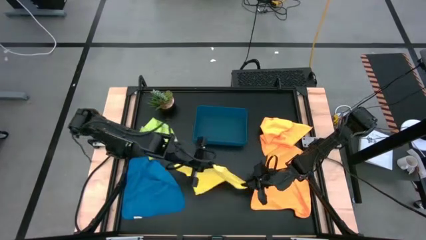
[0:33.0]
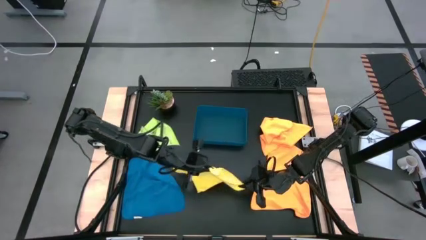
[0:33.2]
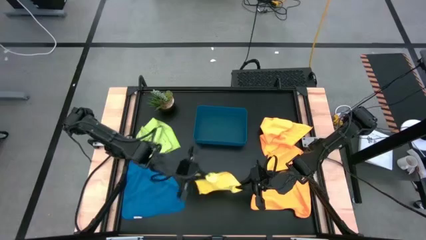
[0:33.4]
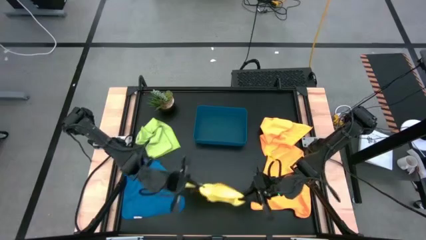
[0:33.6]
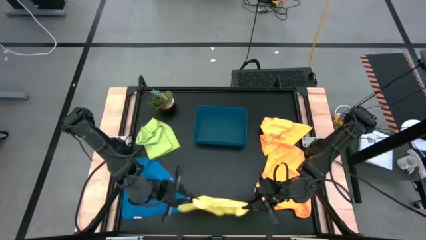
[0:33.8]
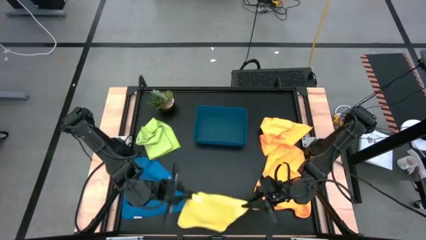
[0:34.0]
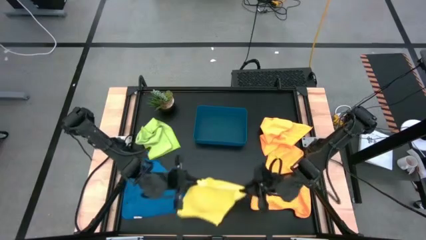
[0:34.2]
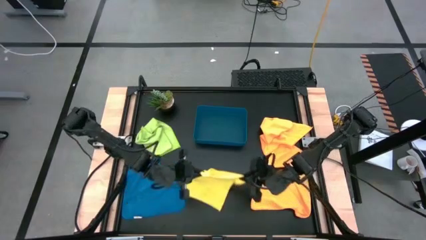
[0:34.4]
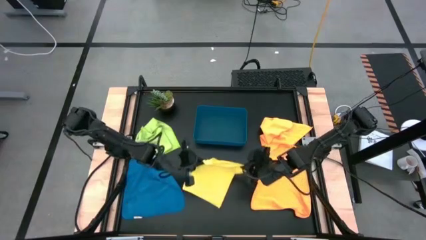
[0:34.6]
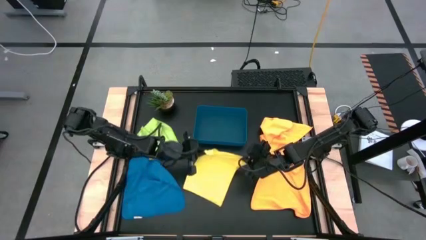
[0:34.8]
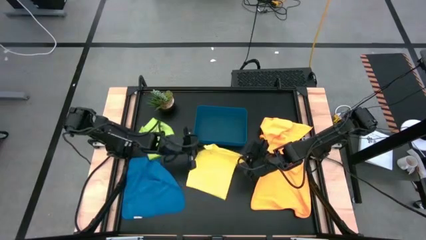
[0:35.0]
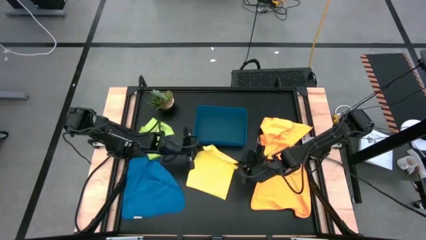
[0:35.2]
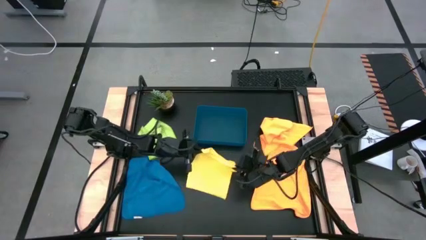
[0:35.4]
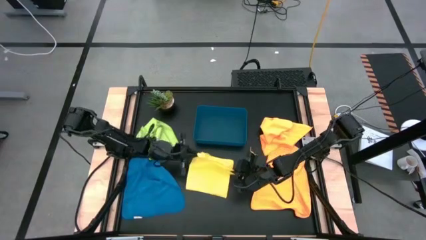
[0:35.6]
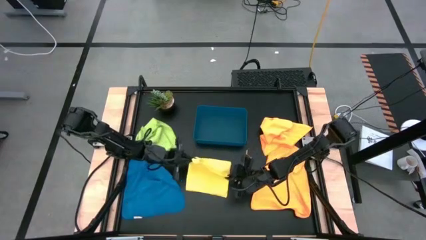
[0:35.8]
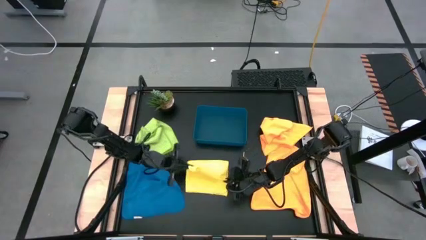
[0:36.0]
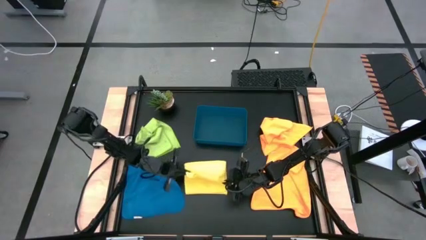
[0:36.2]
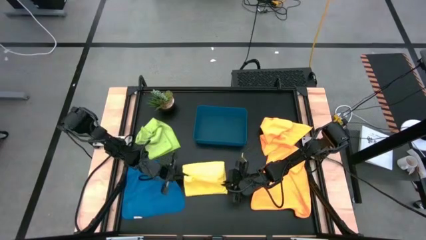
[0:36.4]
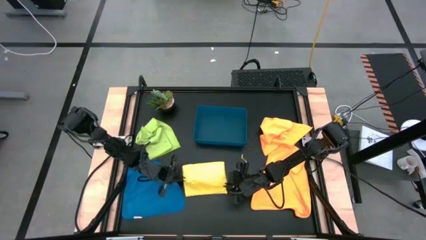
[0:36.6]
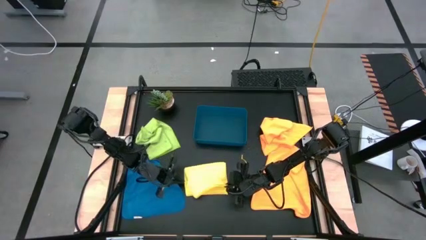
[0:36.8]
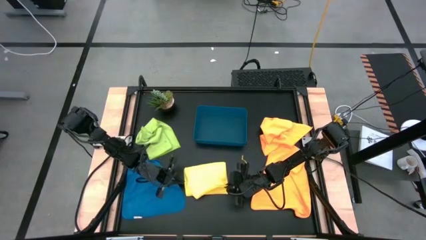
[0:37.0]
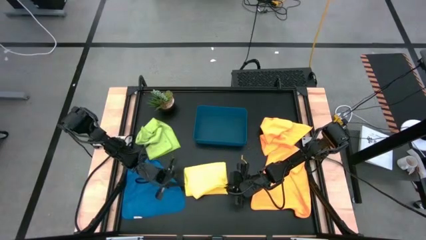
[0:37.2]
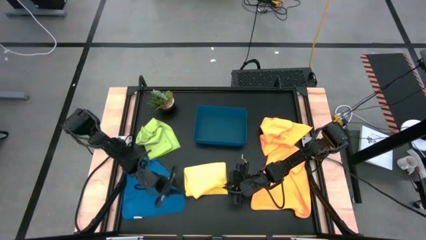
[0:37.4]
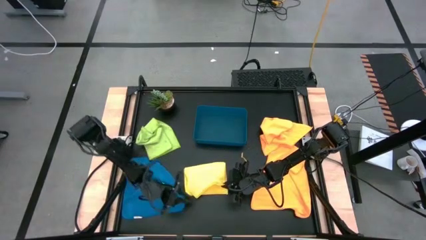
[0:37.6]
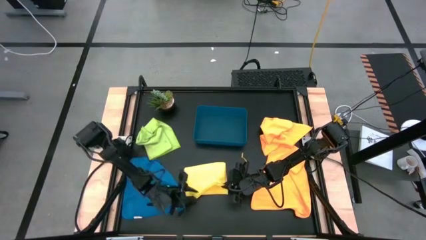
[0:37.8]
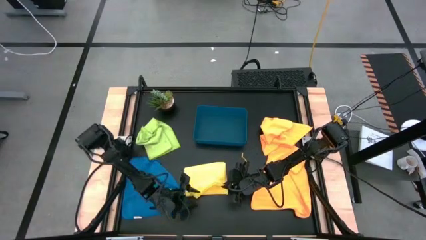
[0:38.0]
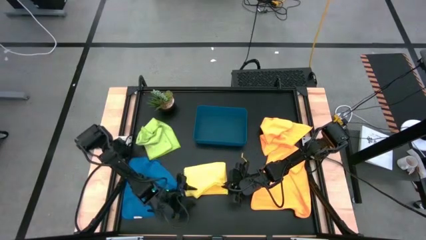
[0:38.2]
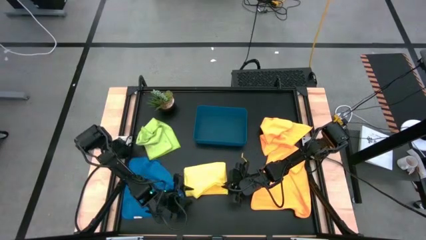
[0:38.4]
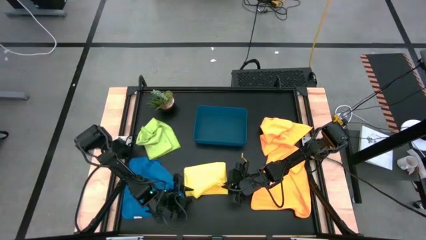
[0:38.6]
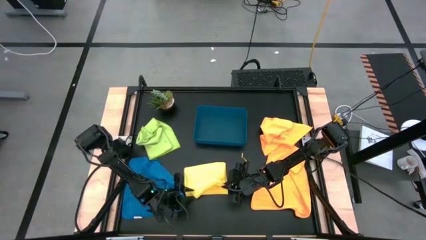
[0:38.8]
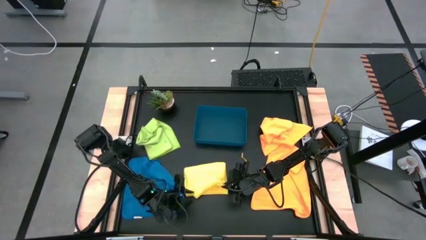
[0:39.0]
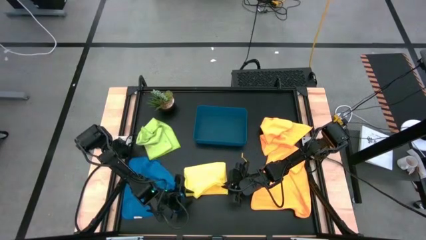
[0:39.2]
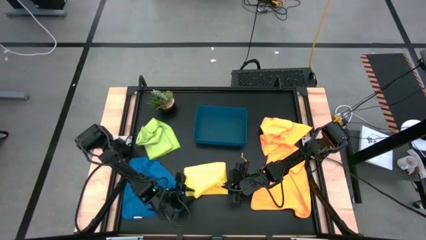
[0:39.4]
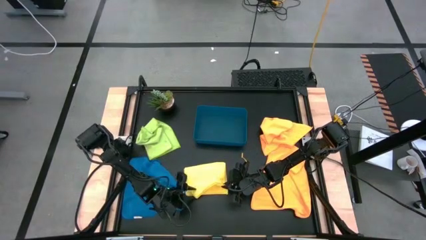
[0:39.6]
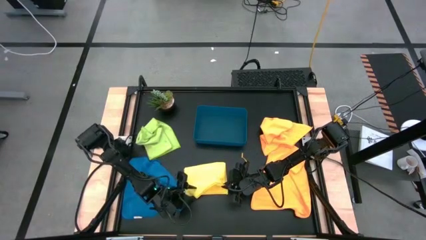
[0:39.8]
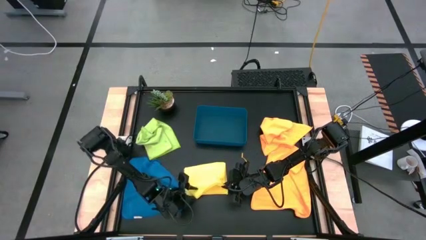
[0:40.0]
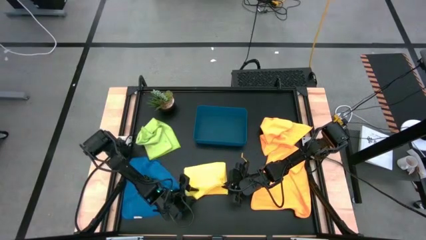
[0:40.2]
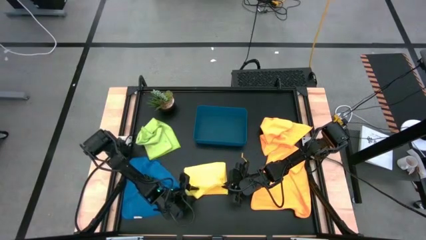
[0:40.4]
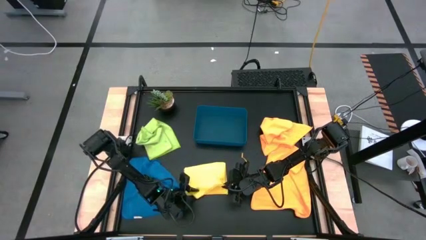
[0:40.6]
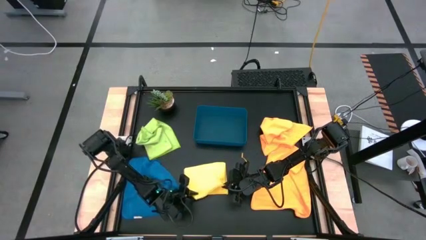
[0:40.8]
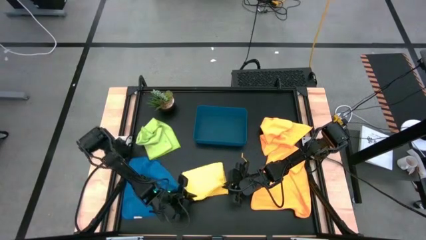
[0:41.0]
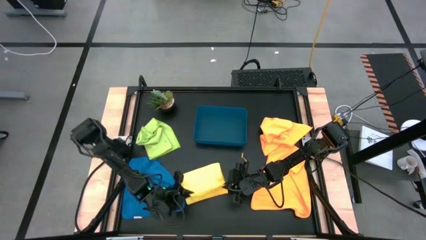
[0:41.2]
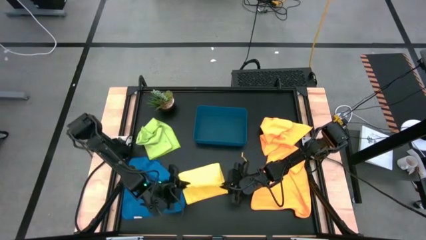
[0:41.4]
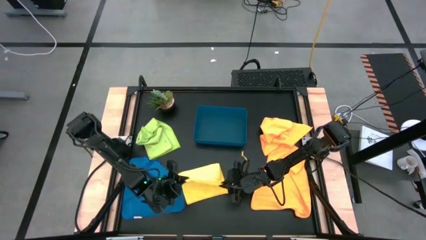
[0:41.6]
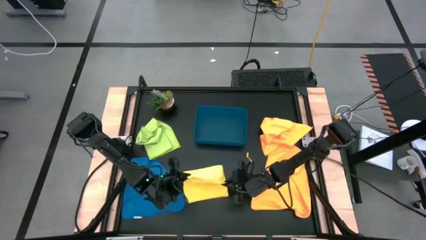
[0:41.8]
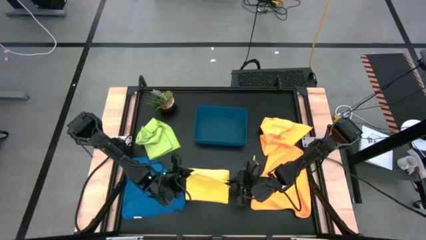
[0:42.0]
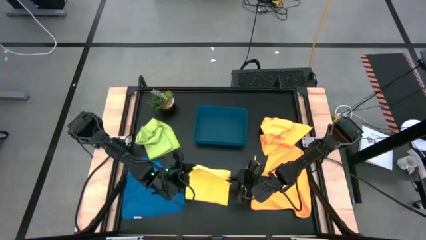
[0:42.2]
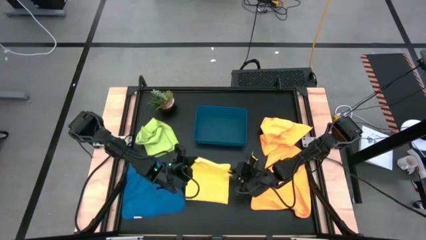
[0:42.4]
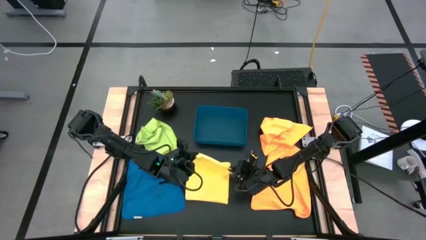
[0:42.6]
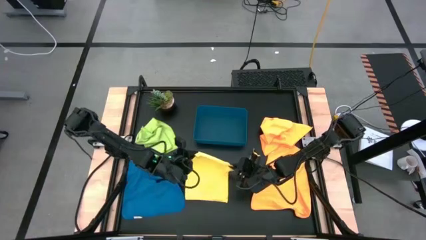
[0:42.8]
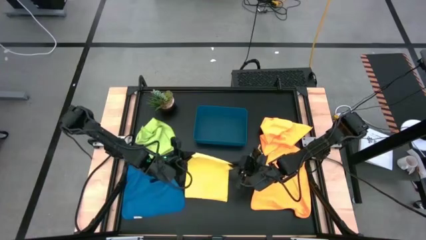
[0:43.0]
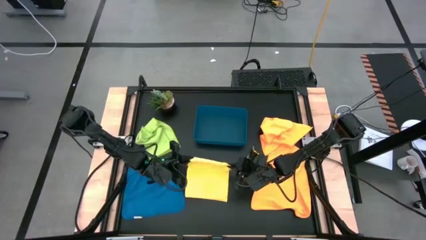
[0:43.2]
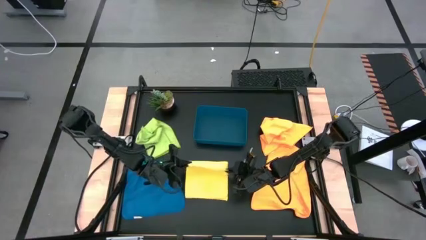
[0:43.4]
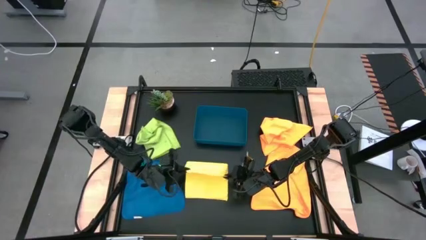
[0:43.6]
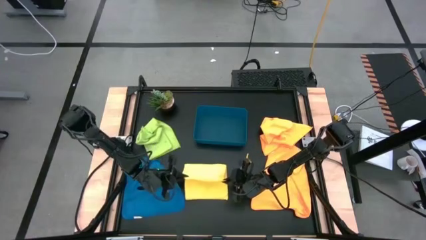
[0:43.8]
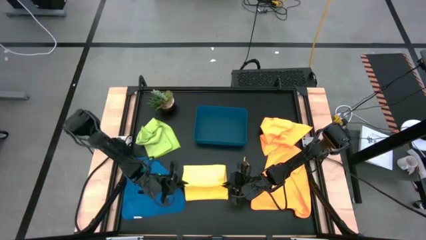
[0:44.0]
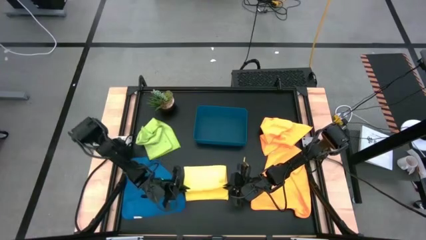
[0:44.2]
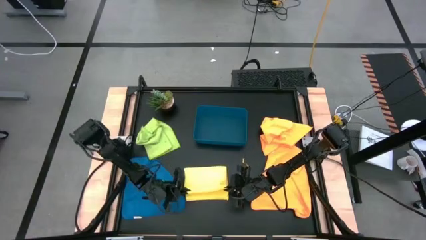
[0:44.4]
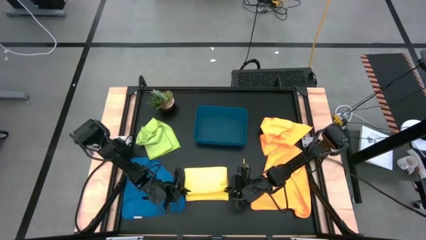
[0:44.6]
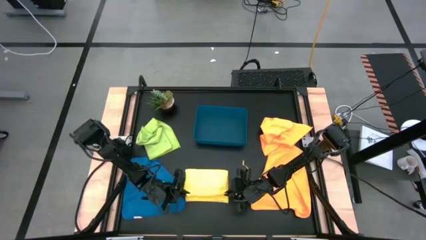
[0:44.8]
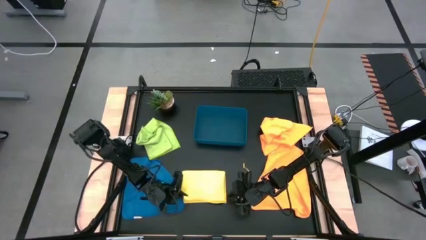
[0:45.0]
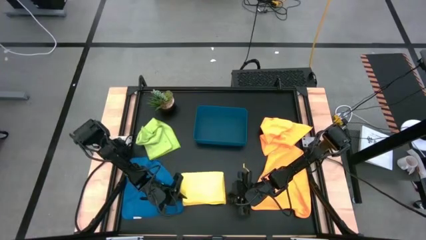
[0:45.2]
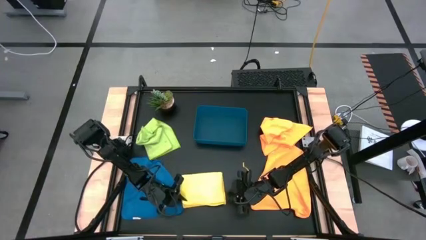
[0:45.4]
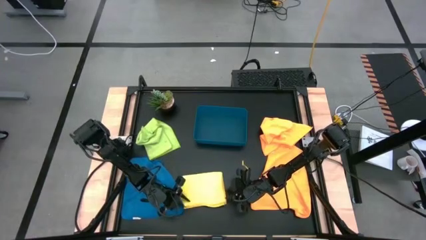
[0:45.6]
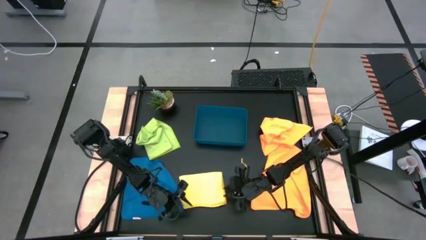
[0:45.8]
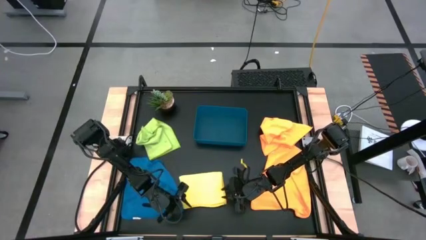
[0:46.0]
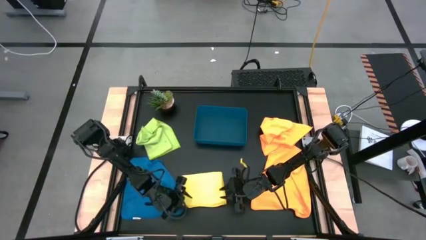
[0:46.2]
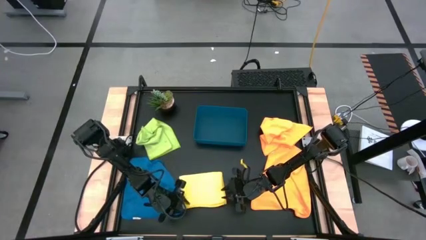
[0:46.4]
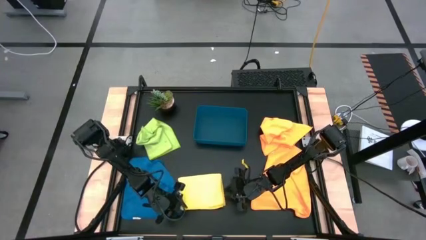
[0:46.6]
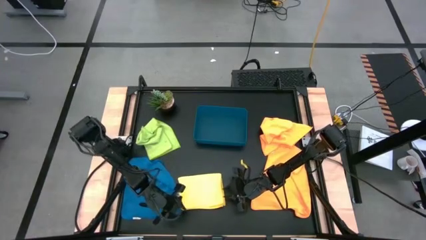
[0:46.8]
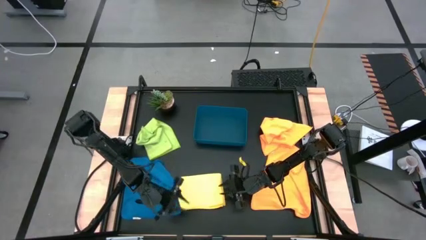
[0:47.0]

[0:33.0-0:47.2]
Task: Fold microfiber towels
Fold the yellow microfiber cloth

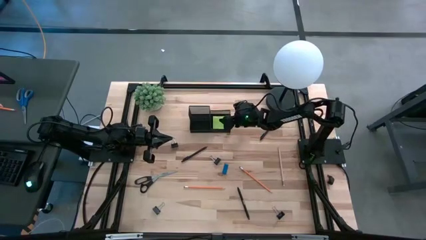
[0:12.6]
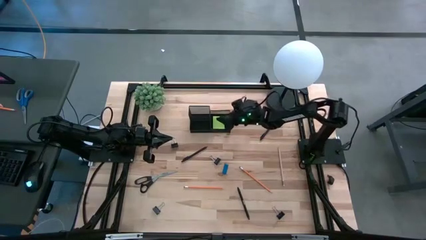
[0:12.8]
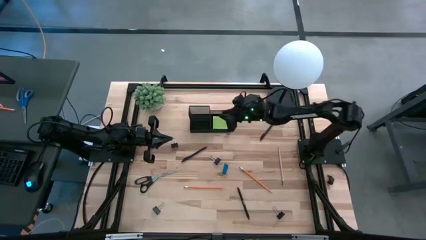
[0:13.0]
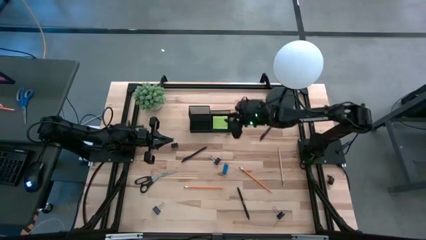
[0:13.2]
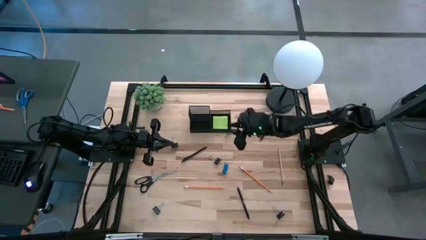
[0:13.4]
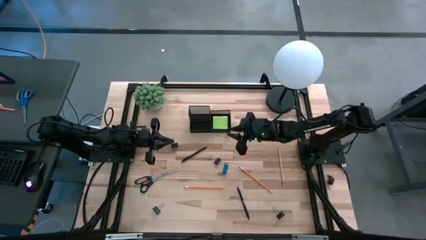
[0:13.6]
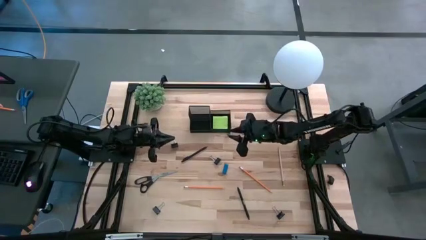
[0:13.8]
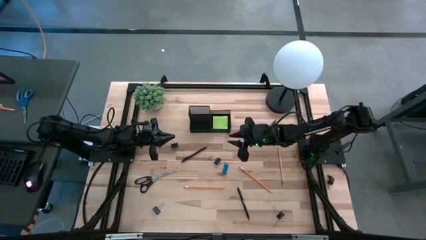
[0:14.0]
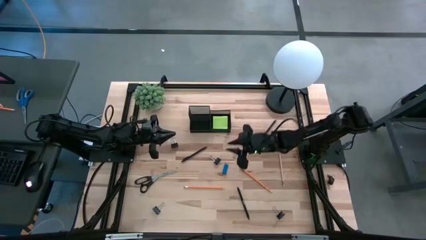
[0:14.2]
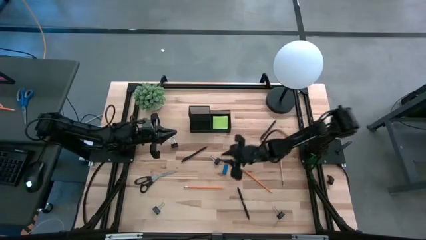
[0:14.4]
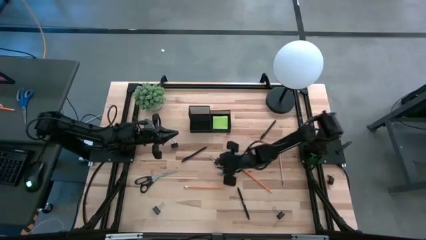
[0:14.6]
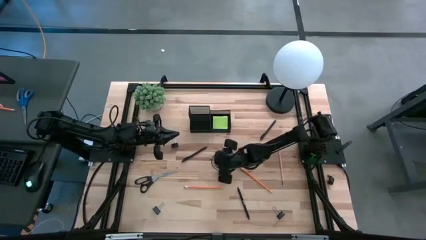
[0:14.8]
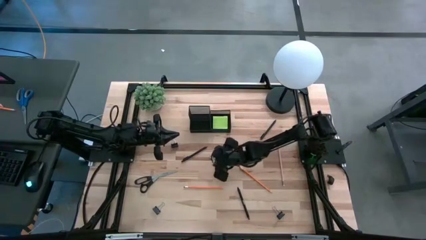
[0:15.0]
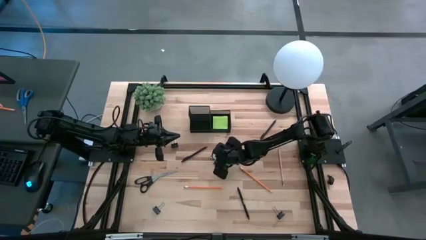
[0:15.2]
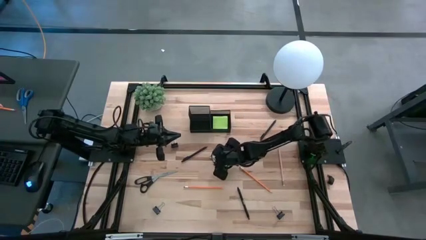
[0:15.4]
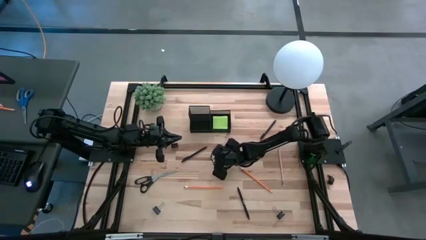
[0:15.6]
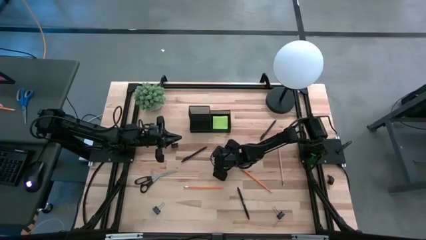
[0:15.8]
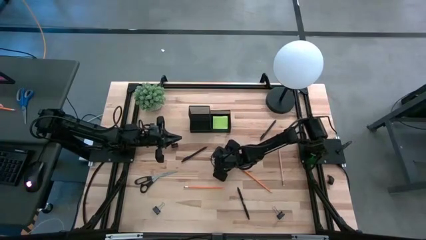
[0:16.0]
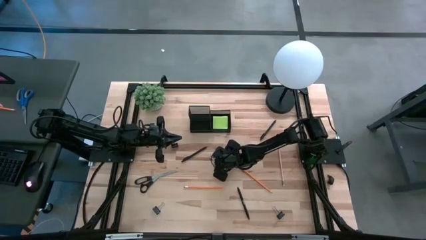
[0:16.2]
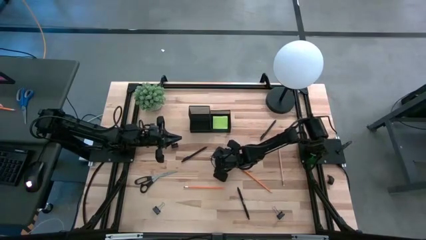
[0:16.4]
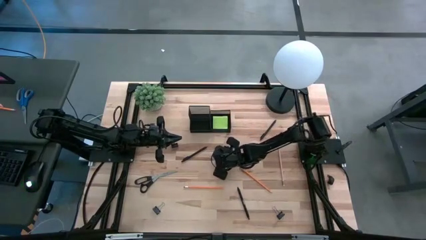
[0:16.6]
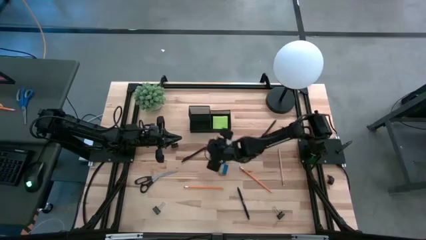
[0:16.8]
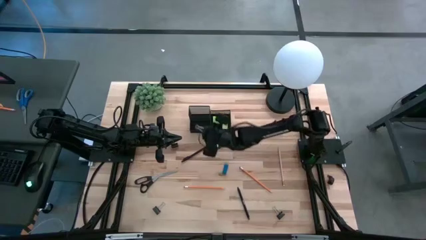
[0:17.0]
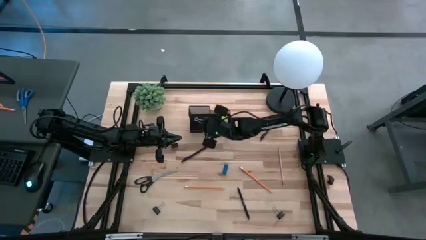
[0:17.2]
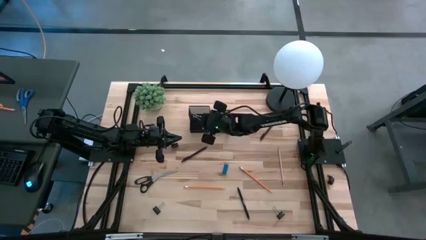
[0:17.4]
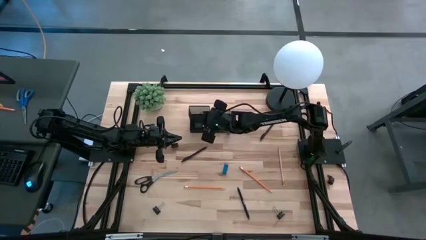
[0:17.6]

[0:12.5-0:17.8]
Task: Pick and place office supplies into organizer
Put the center clip binder into the organizer bin
